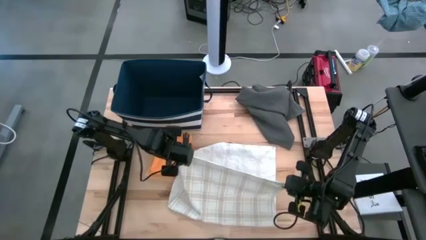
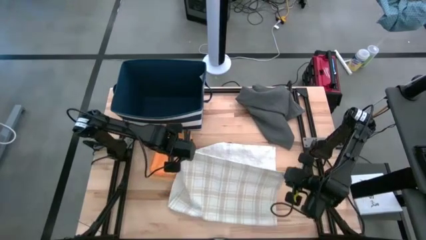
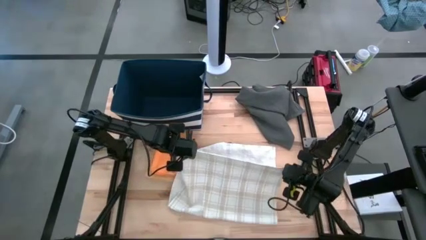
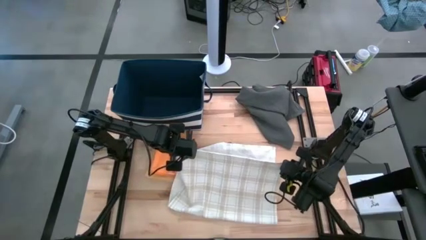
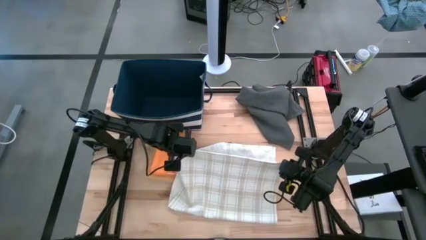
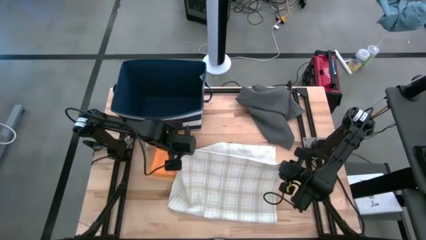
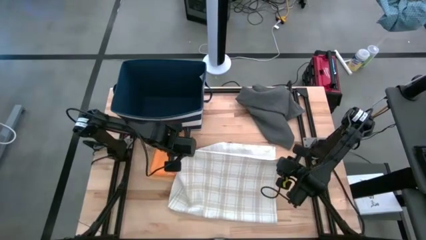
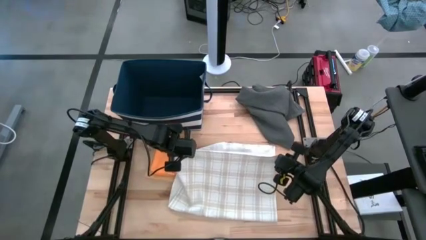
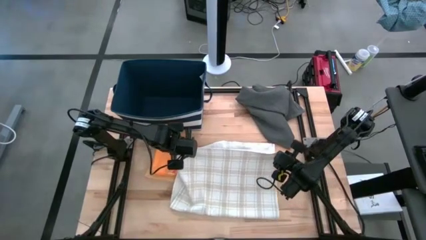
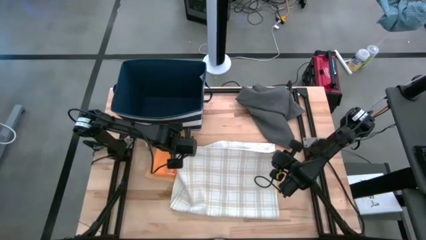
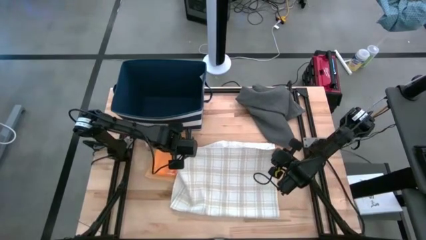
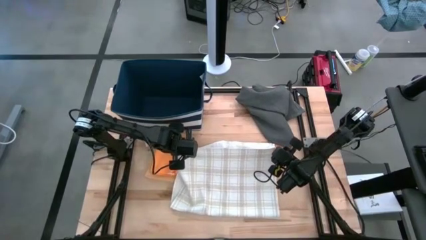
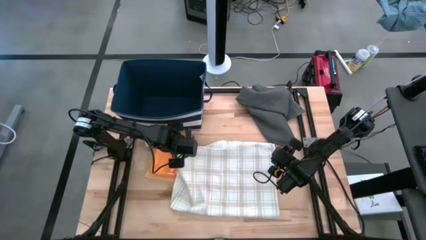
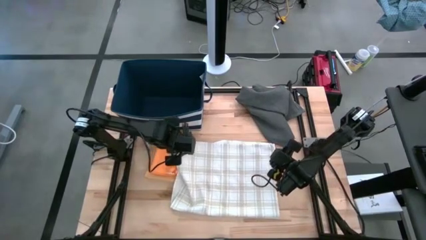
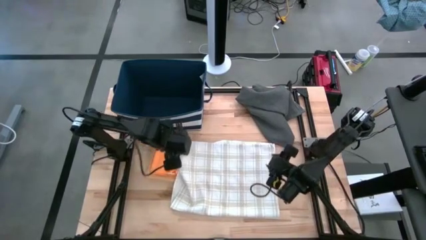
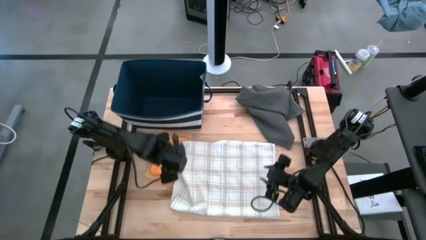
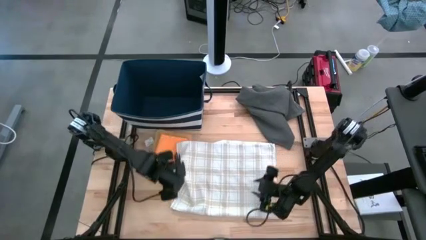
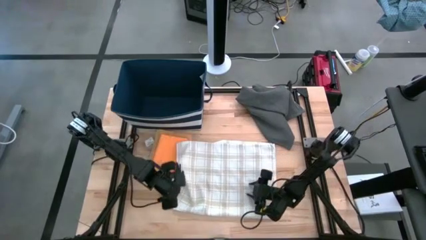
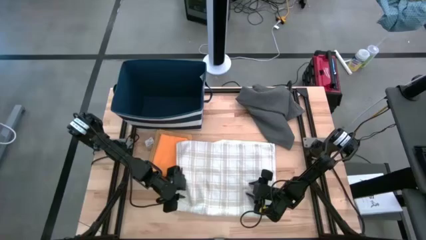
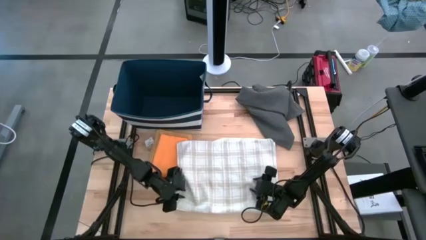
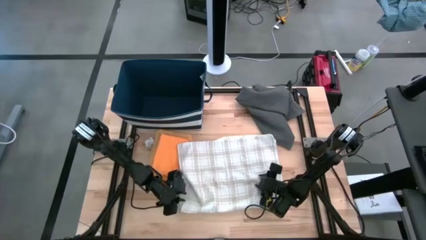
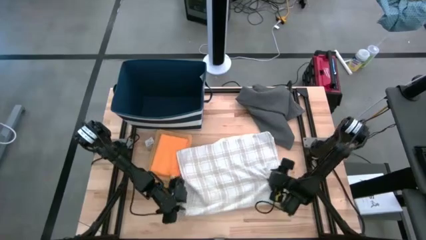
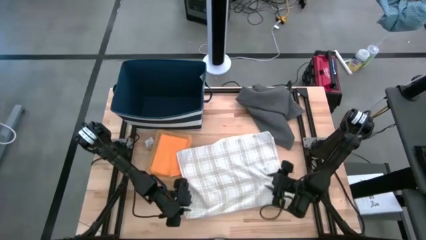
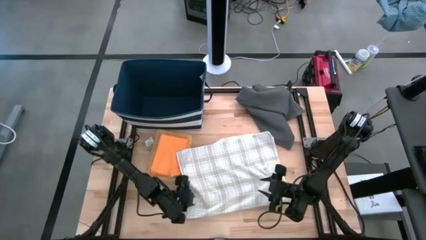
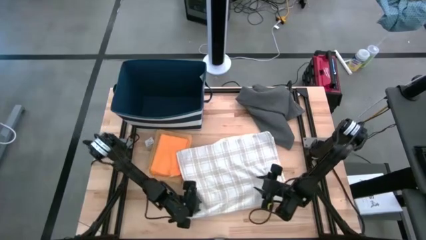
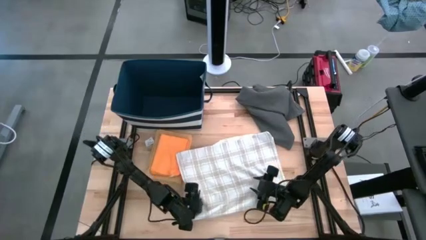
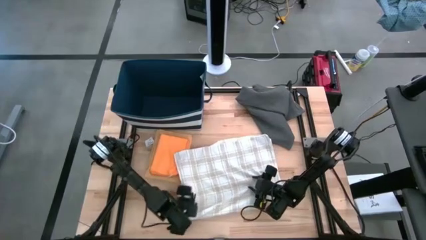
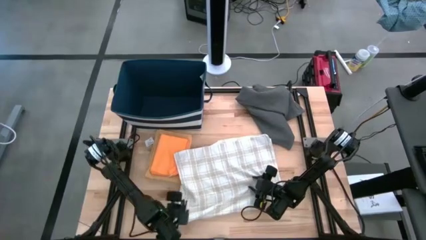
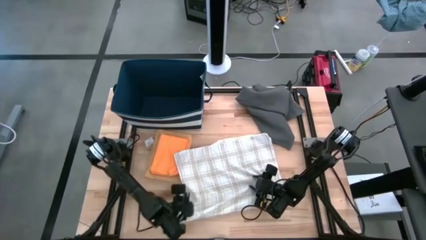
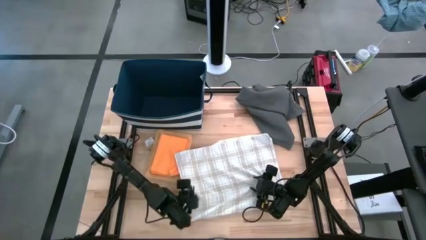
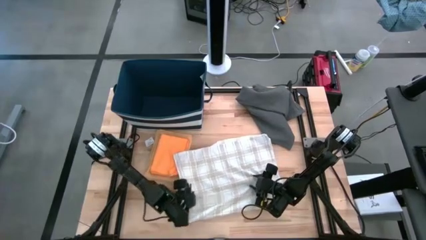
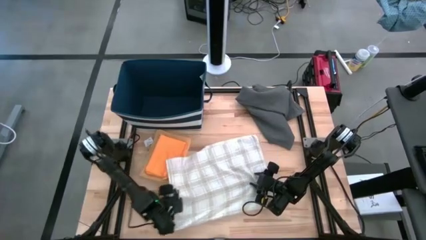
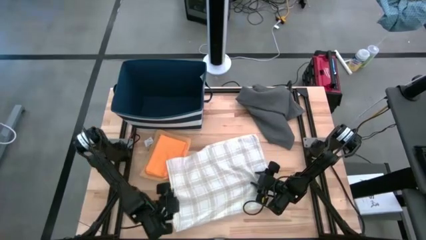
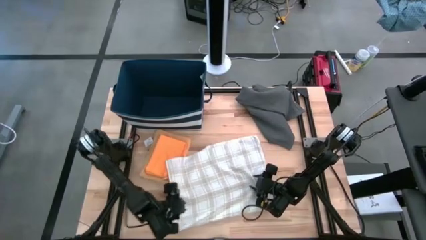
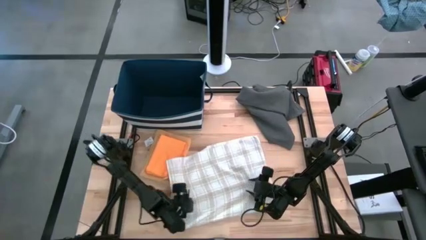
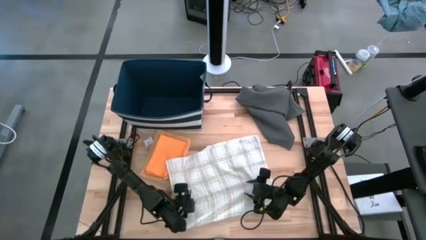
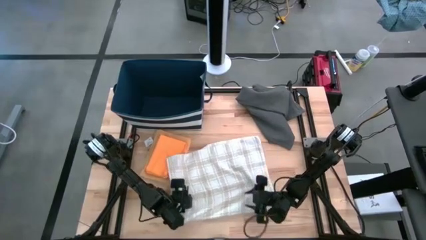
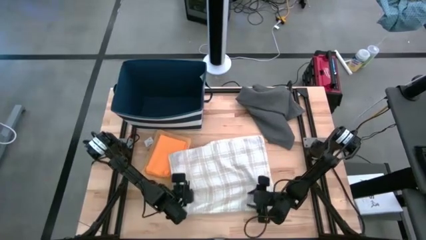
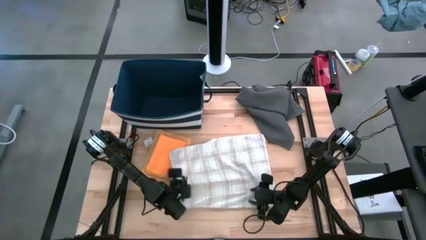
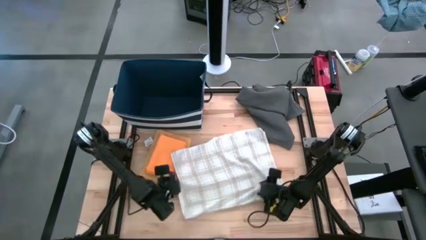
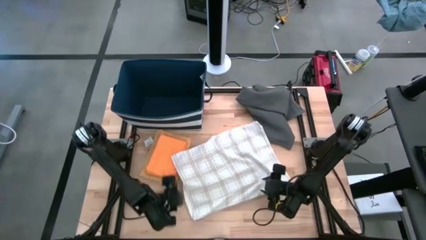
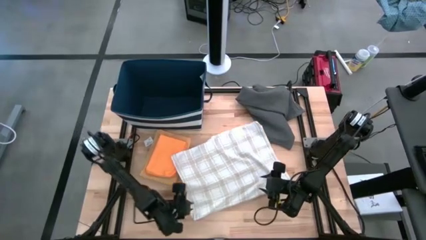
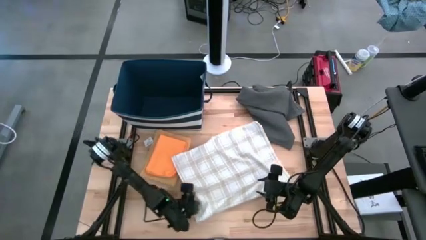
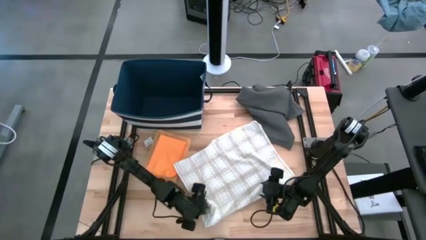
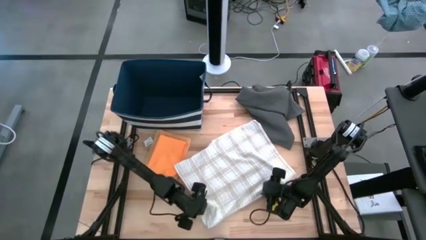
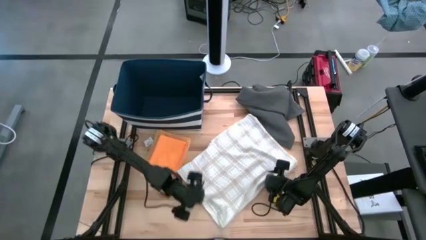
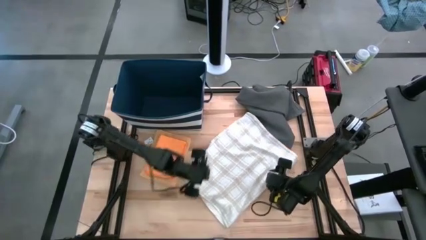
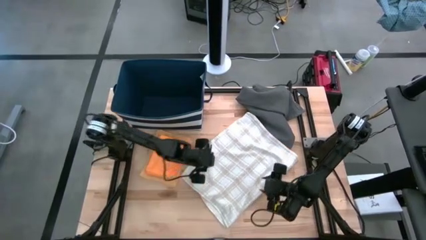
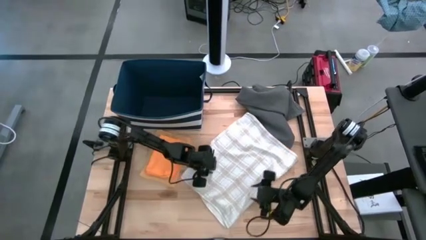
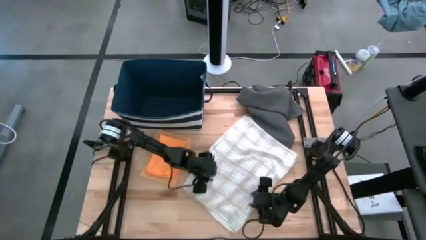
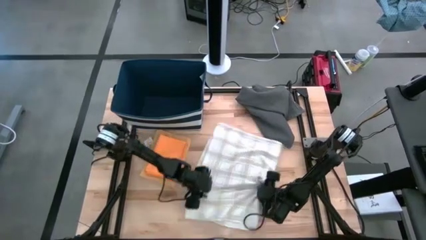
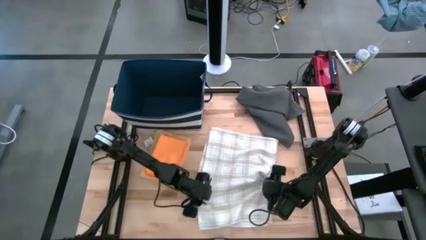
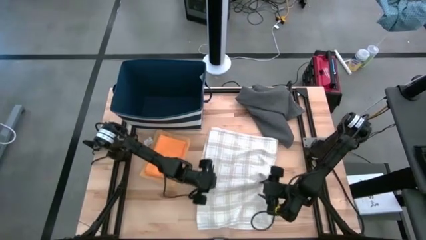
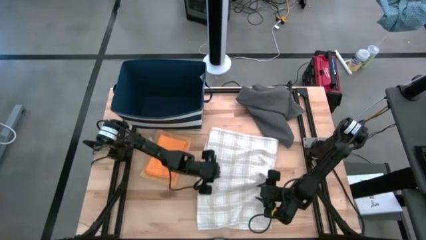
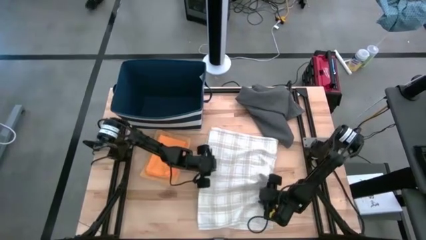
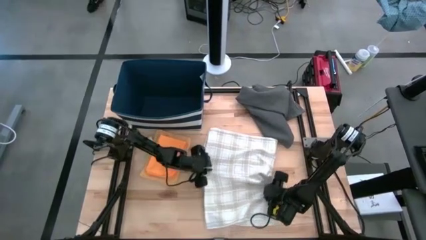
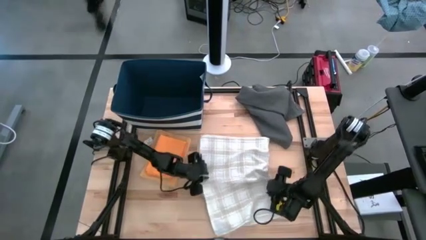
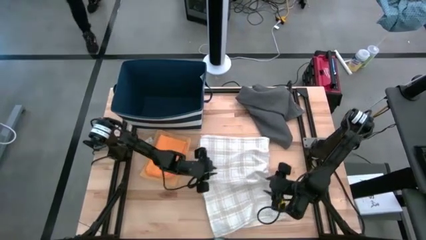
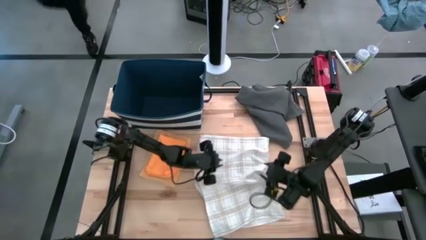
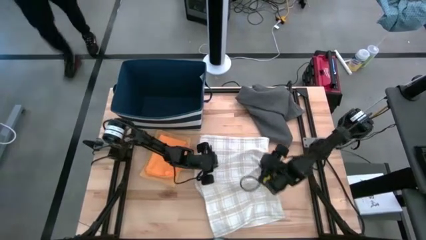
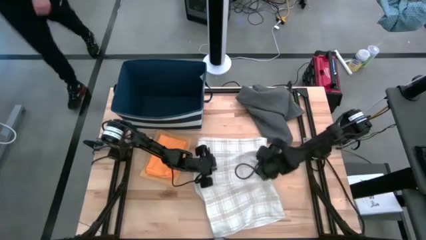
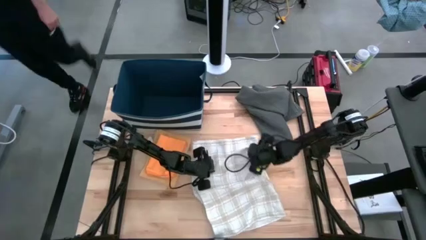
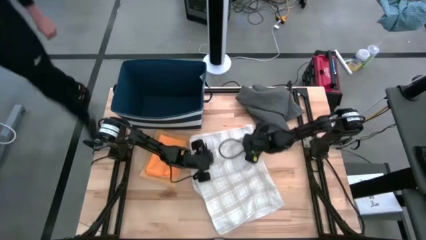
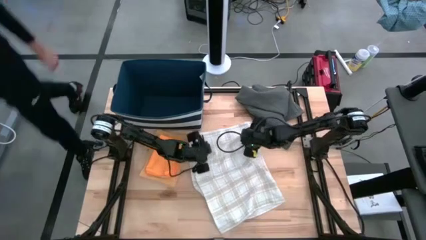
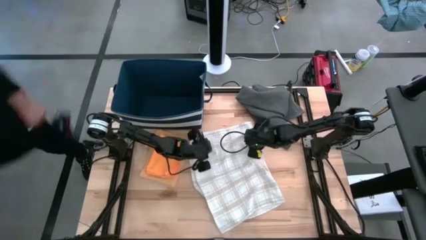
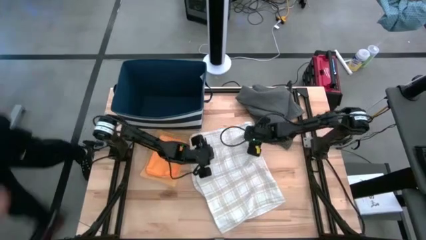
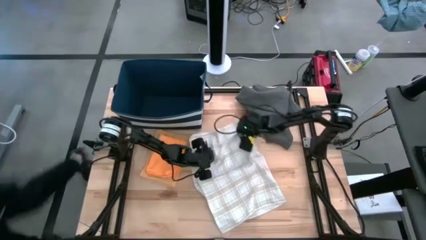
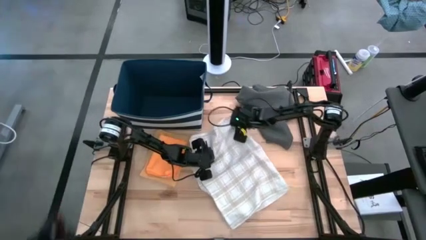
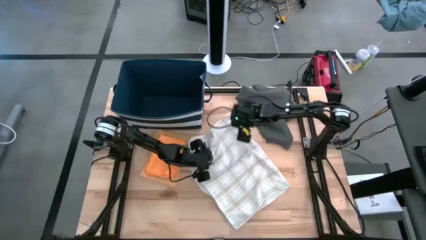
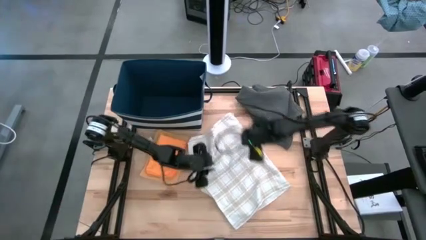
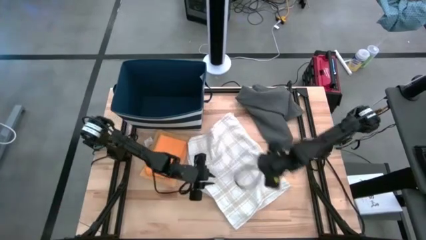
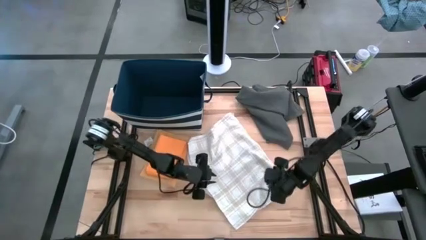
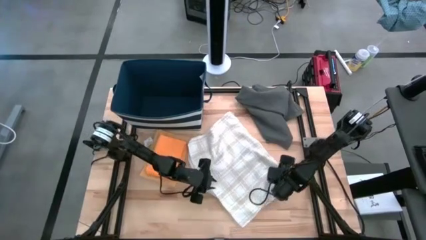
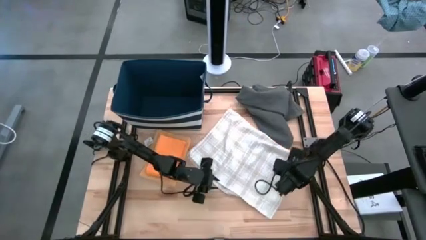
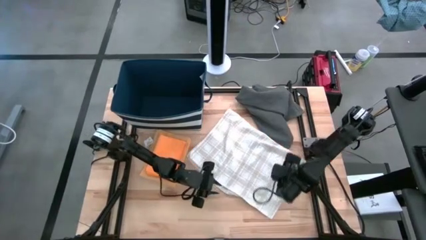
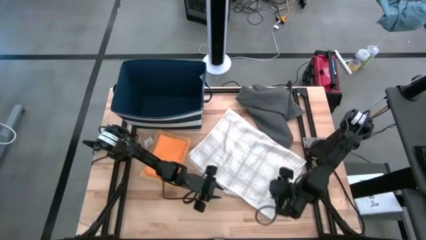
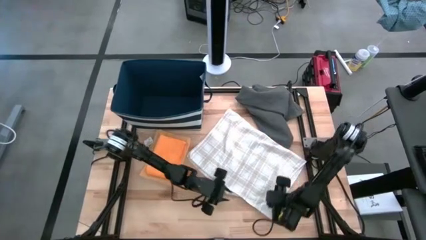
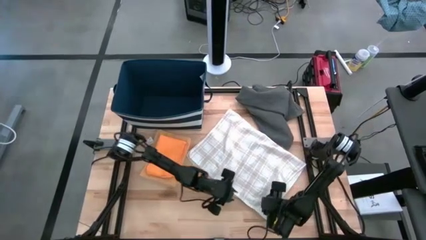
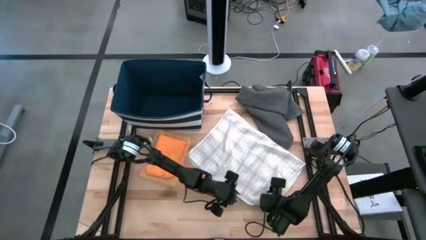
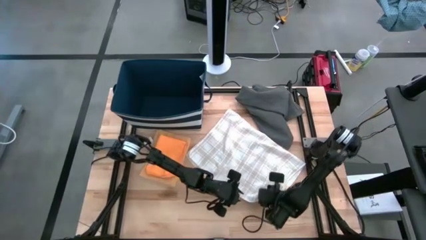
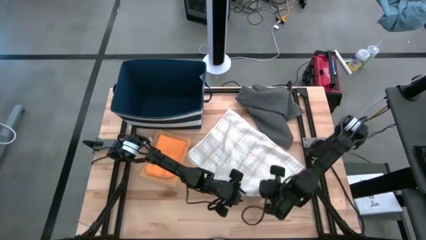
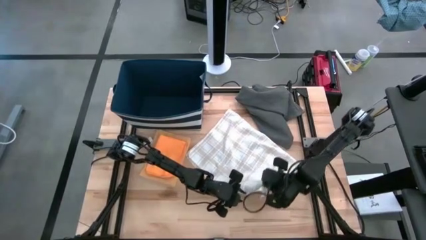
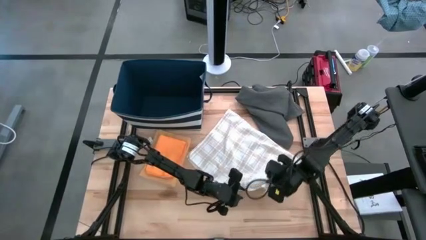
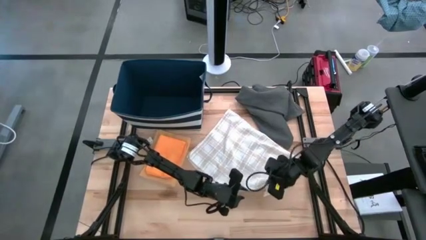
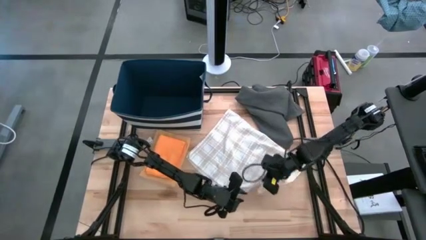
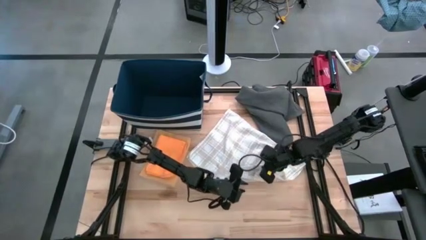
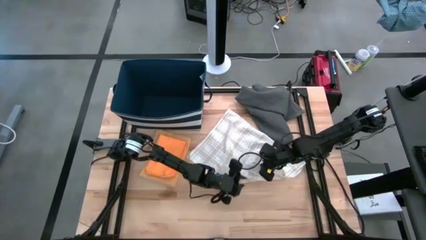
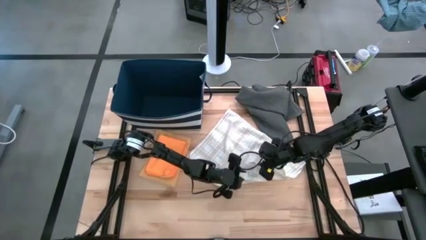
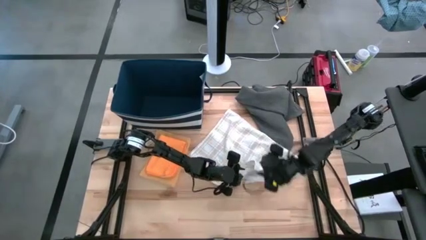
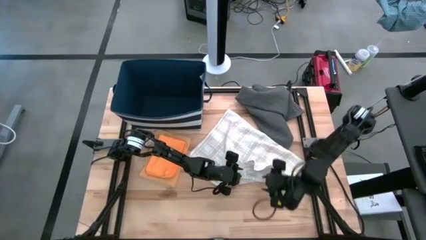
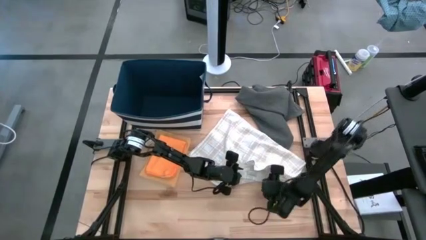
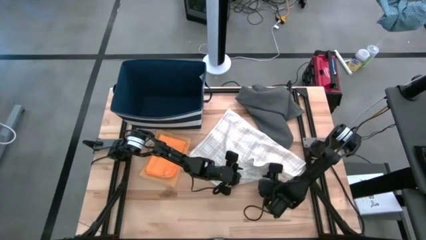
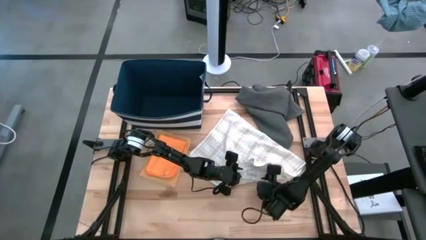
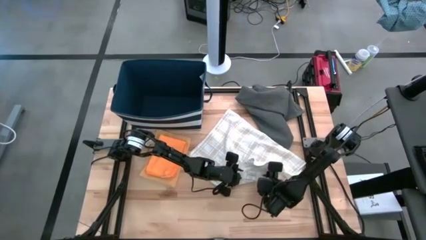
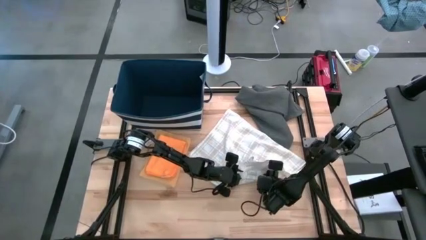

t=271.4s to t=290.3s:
Task: Fold towel
Fold the white patterned kitchen towel
